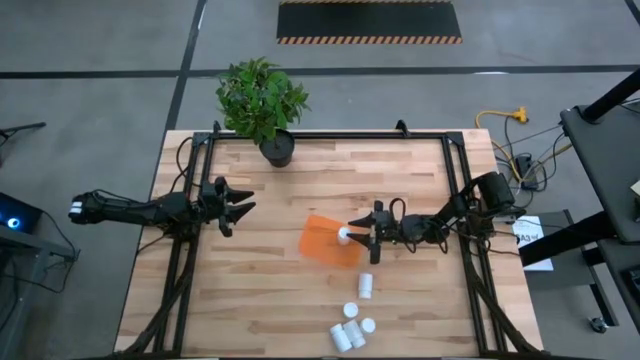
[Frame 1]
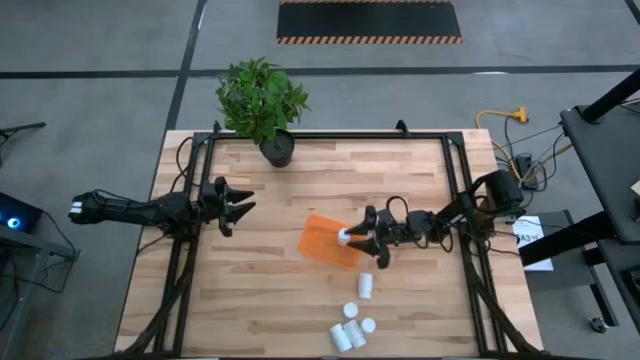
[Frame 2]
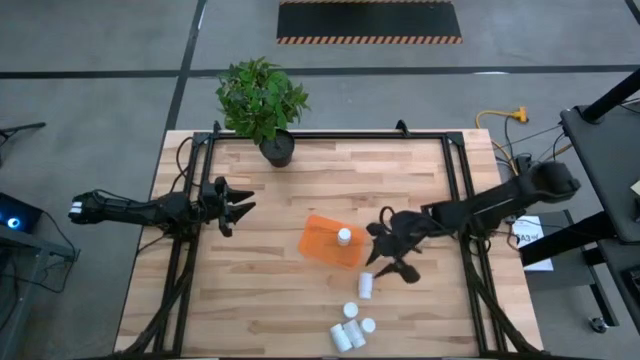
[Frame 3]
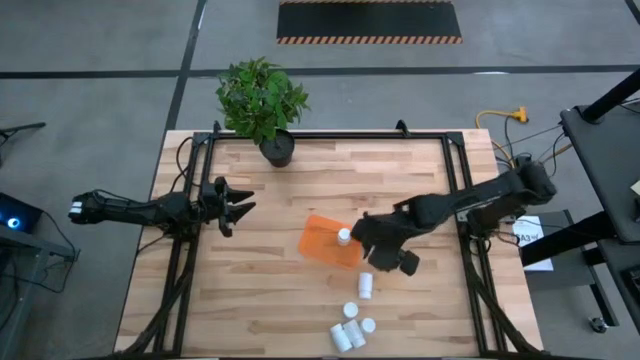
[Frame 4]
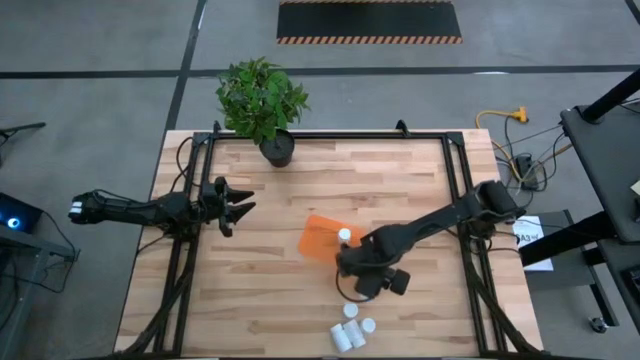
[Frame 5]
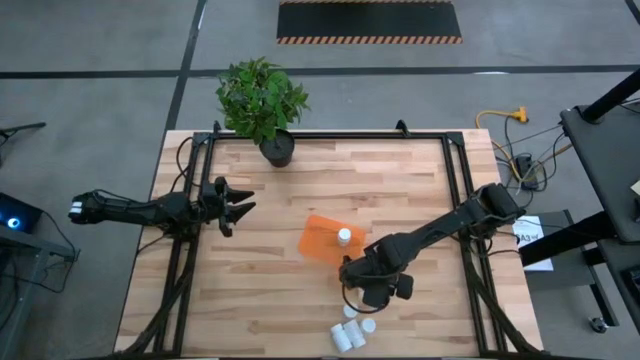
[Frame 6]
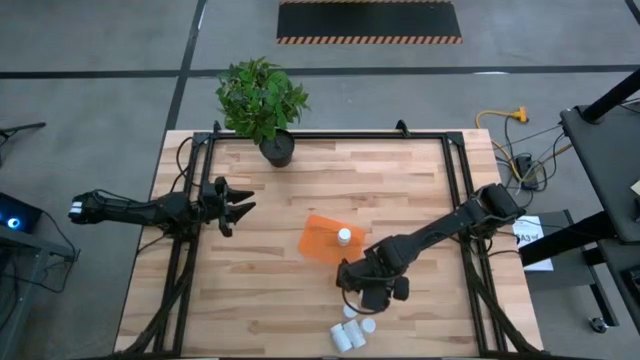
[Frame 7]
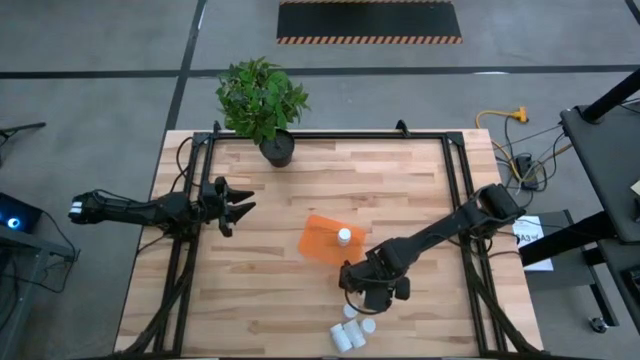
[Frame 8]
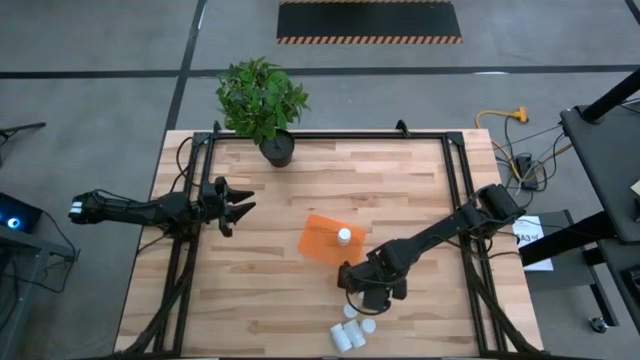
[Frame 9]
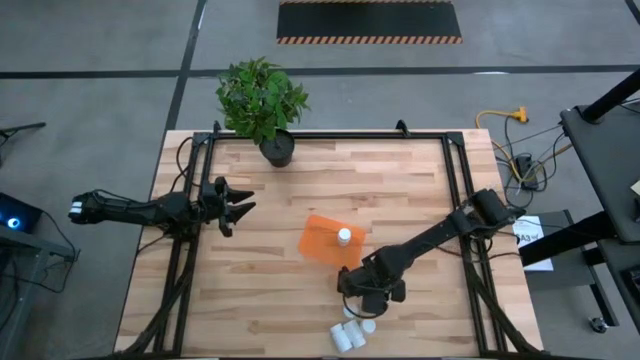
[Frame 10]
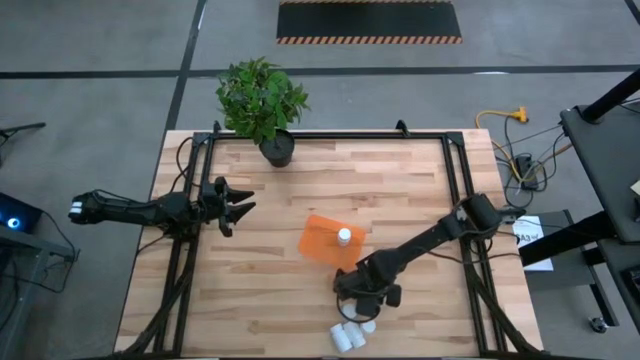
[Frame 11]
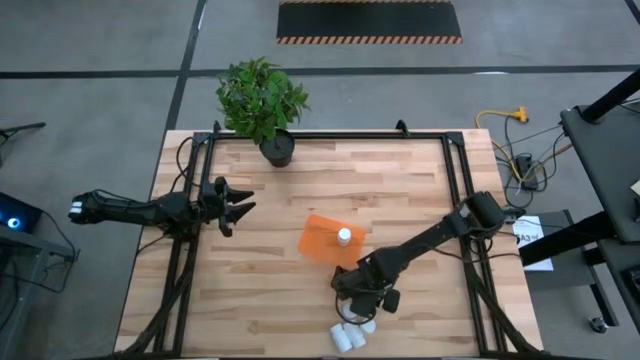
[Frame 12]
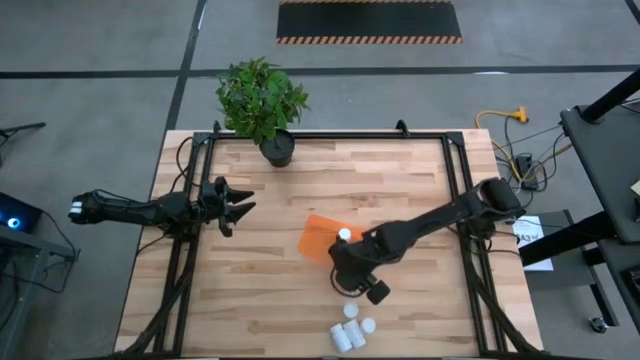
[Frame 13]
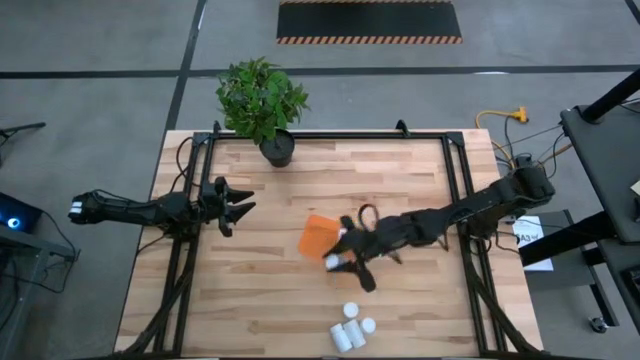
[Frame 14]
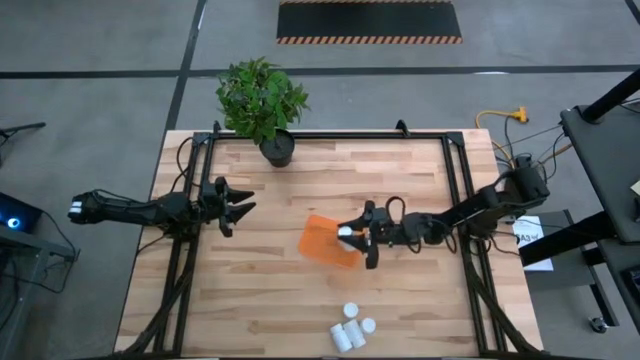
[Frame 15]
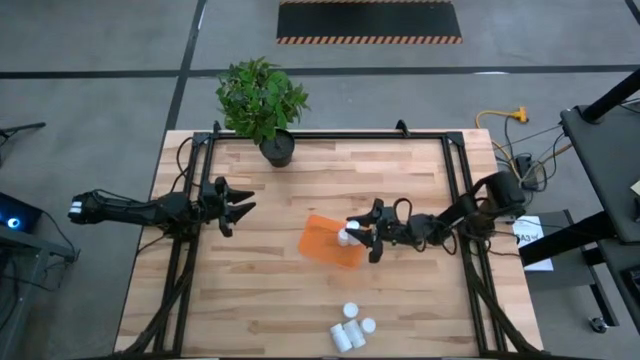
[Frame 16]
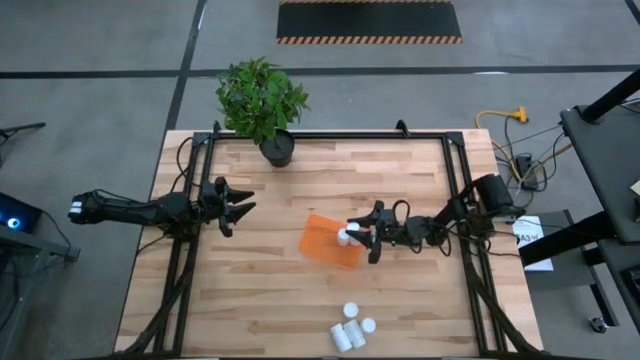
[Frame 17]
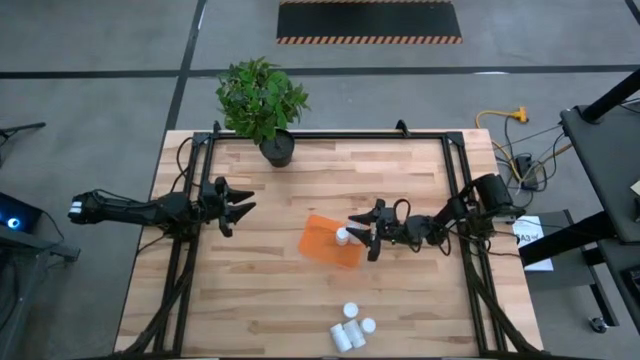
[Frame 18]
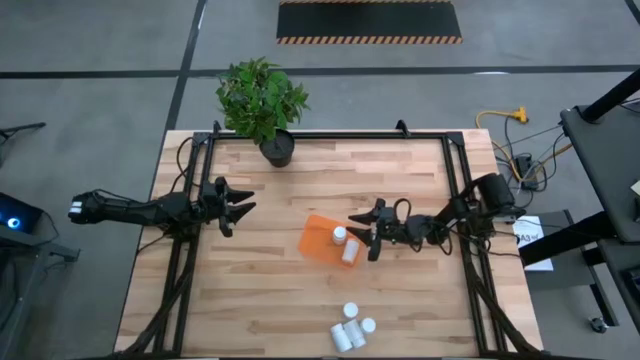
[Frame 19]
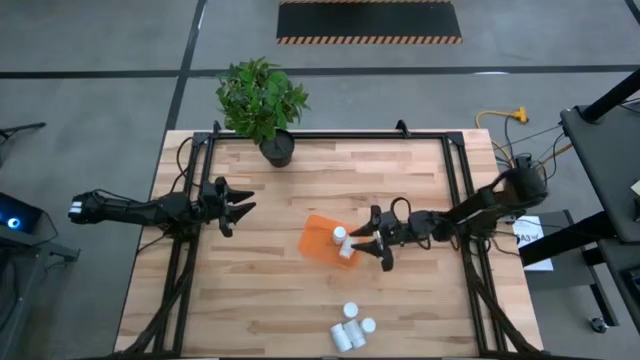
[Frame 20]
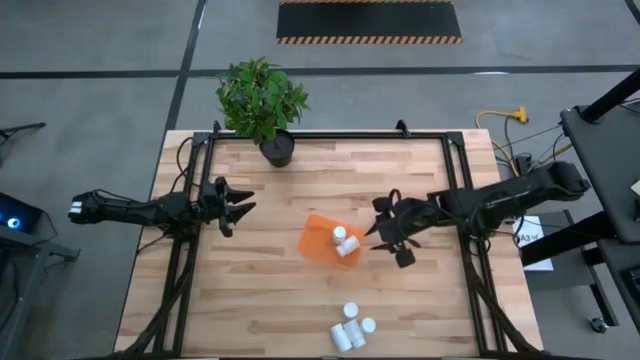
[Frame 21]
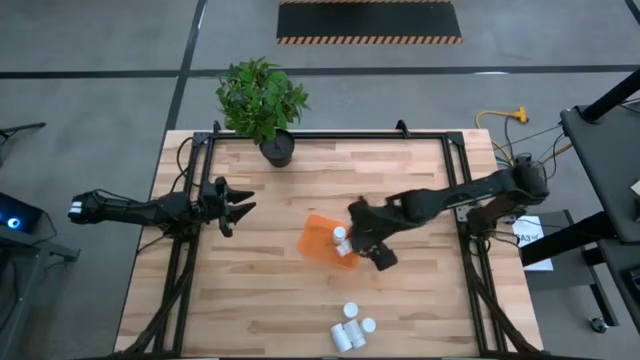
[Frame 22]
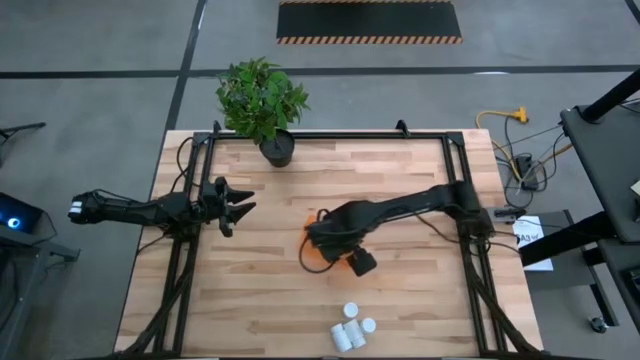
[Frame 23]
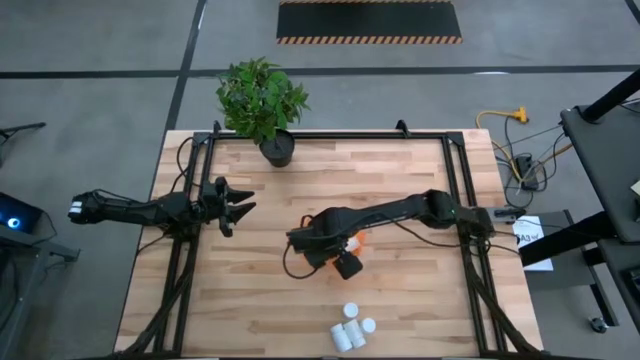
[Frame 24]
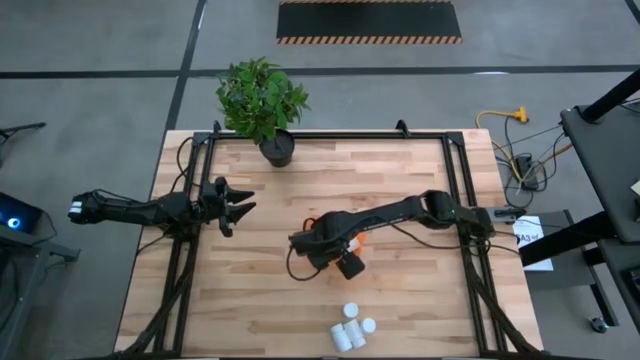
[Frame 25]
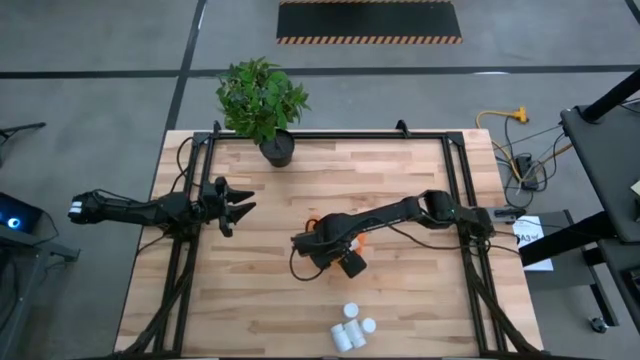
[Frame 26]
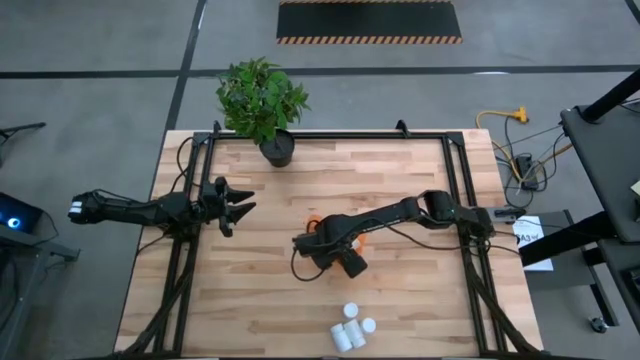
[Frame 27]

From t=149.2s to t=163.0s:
Task: Pick and place pill bottles into a basket
Put the white pill bottle into the orange container

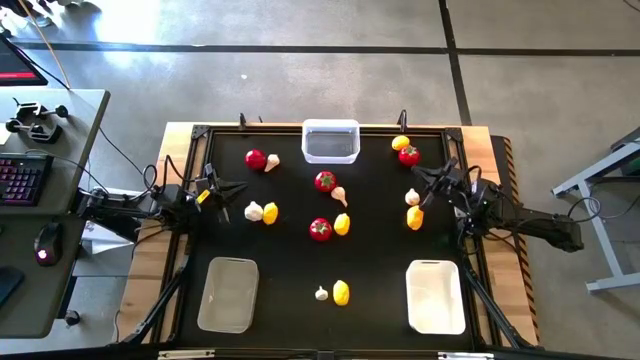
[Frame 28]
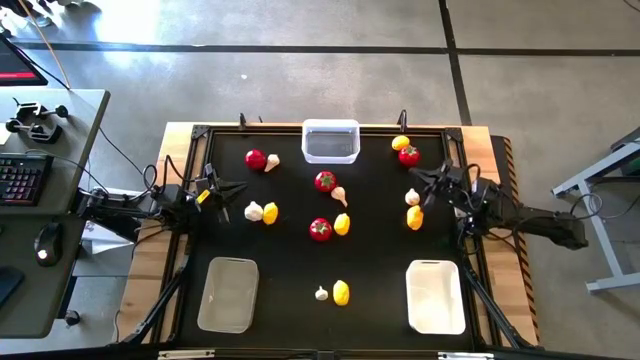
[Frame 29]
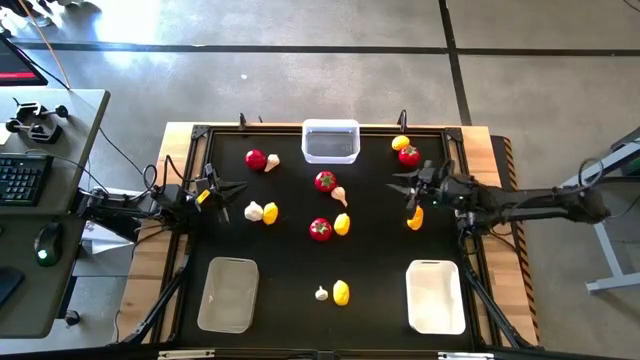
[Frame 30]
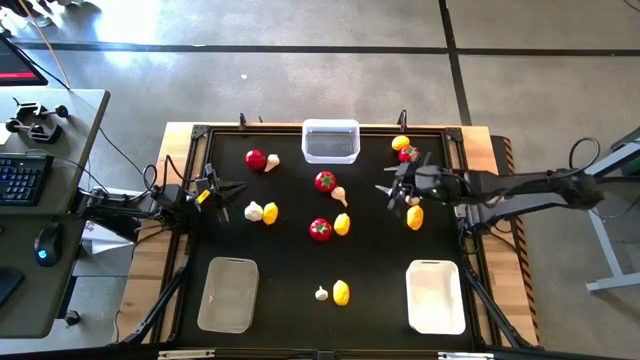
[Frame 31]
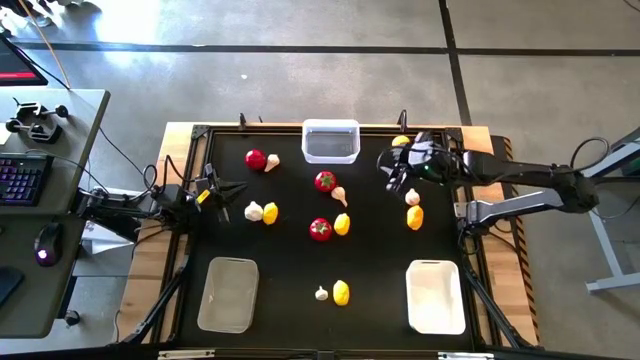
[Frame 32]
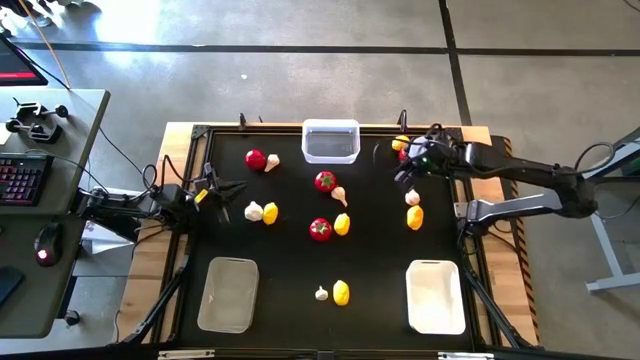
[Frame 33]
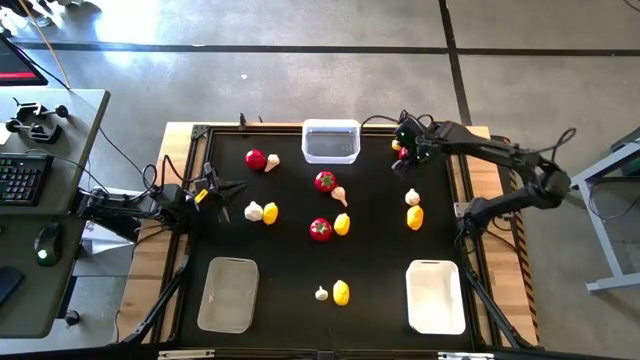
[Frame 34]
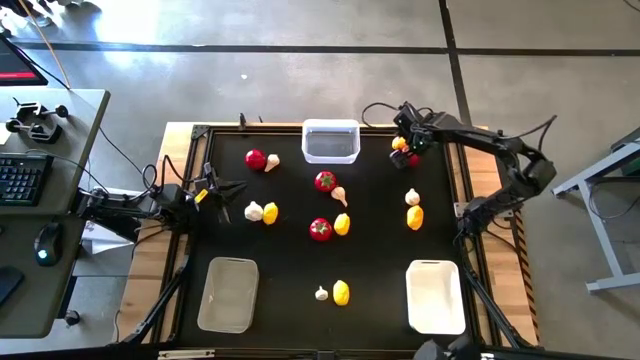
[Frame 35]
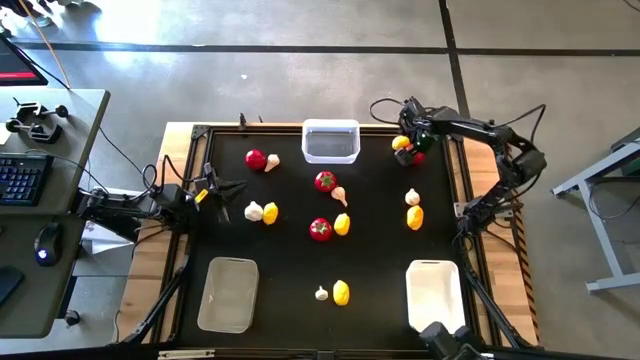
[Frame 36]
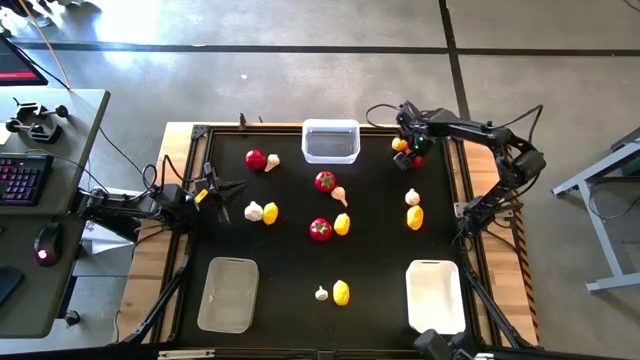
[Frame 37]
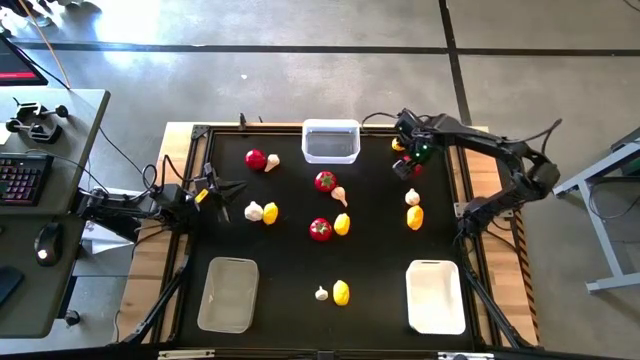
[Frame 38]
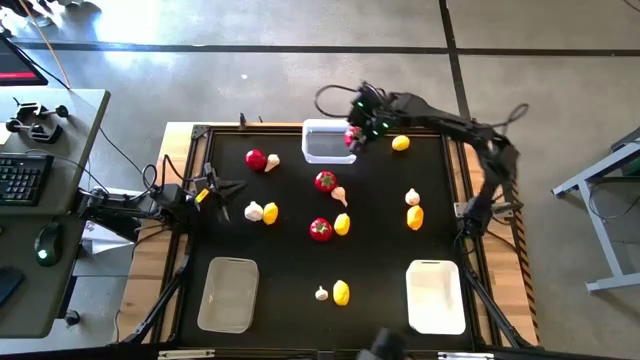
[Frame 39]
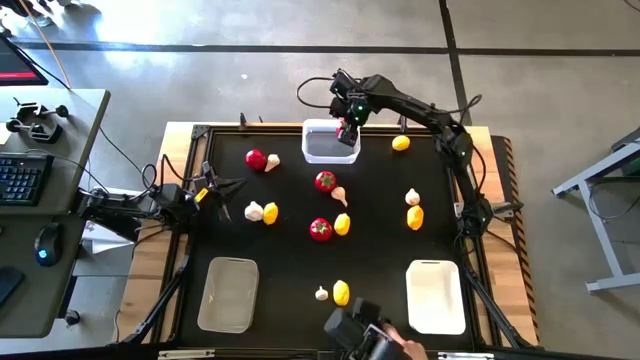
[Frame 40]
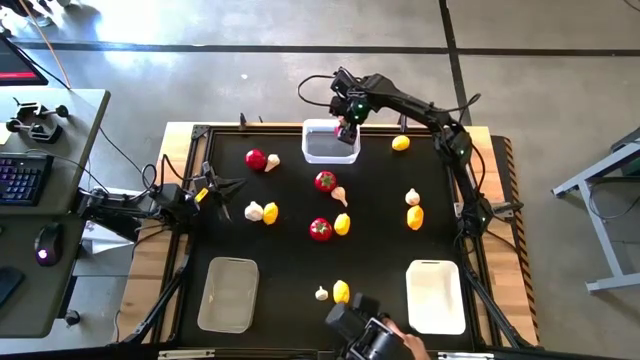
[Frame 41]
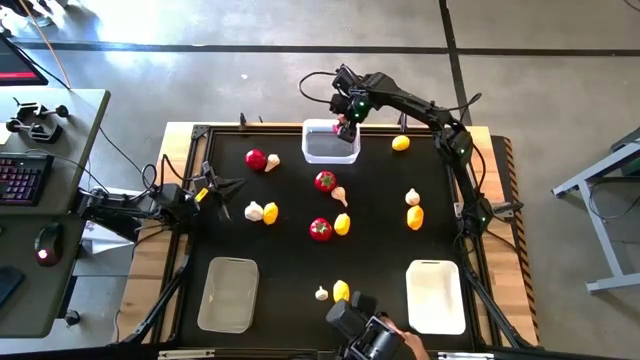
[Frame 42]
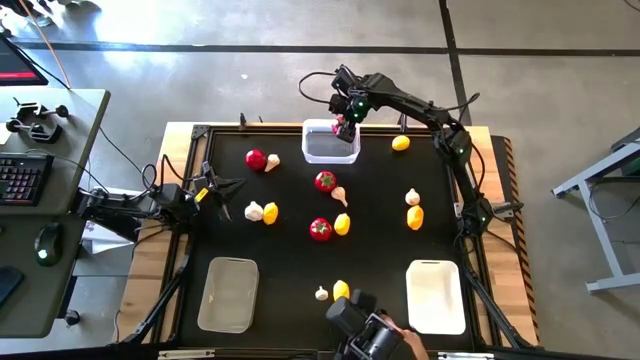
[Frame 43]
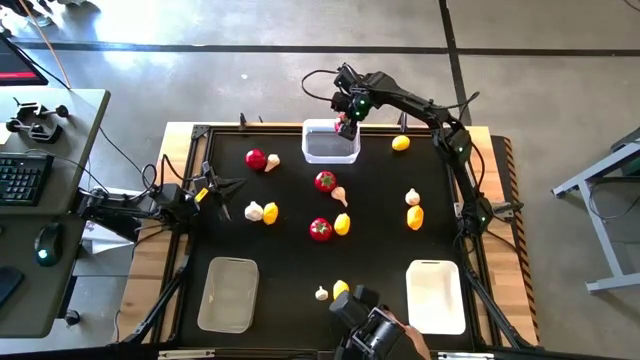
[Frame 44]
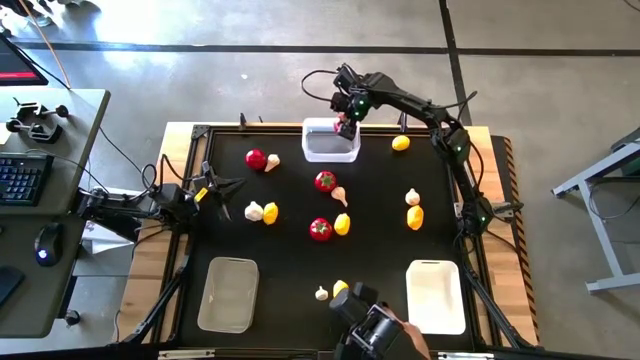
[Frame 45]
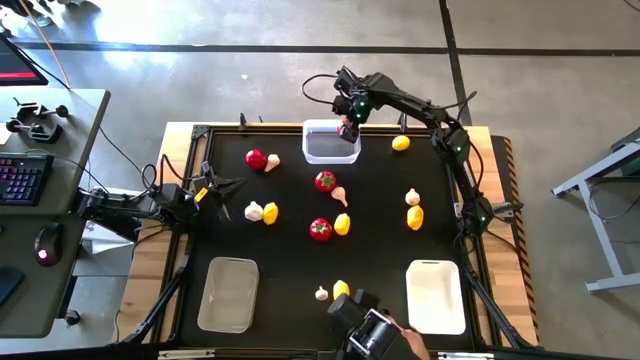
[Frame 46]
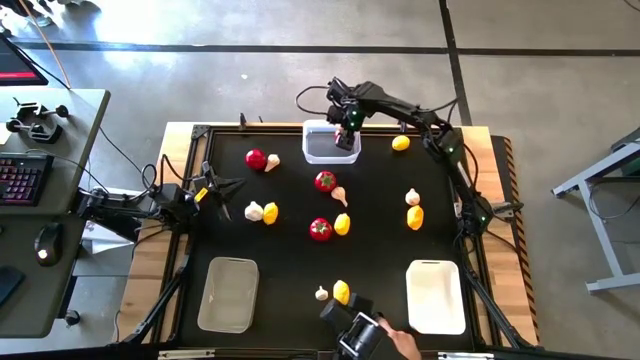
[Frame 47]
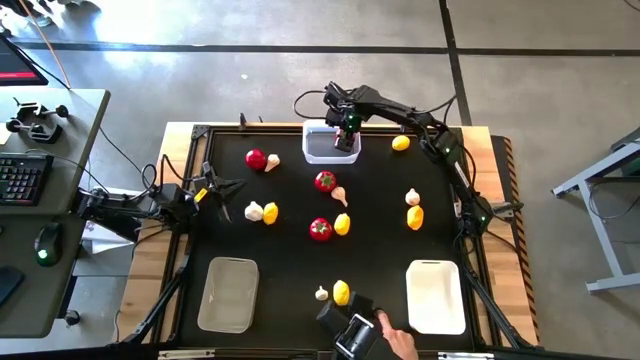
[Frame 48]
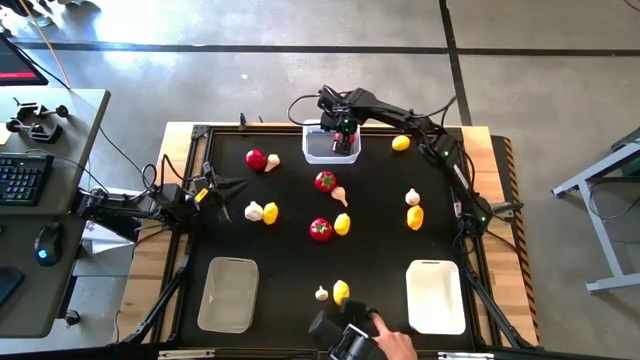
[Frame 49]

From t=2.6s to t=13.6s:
Task: Sort produce into baskets
Put the red tomato into the transparent bin
